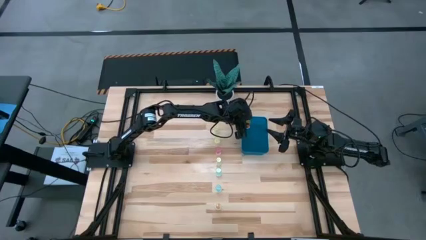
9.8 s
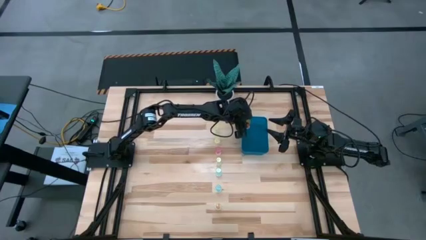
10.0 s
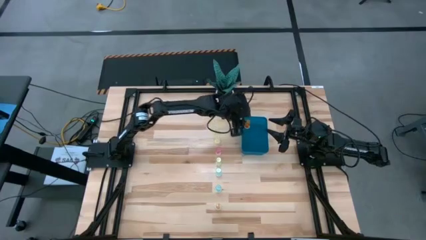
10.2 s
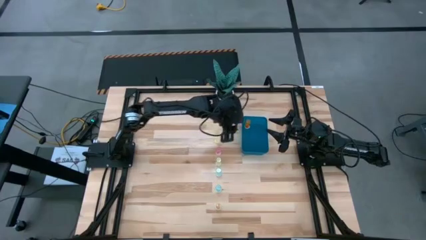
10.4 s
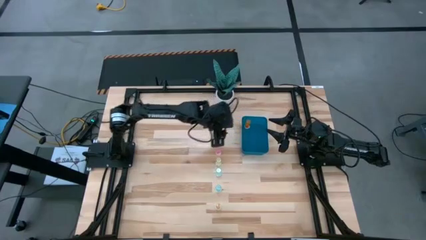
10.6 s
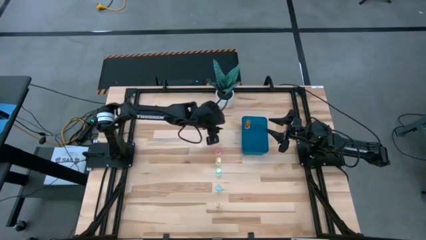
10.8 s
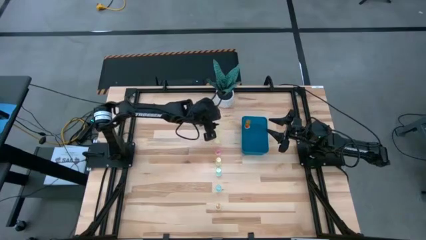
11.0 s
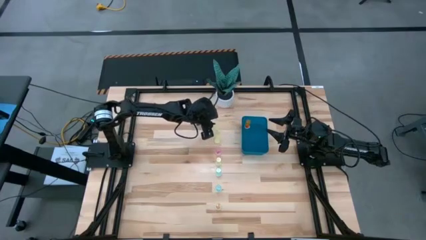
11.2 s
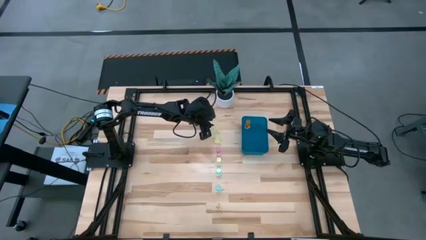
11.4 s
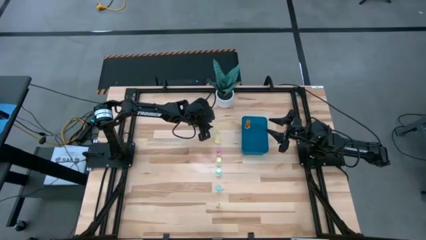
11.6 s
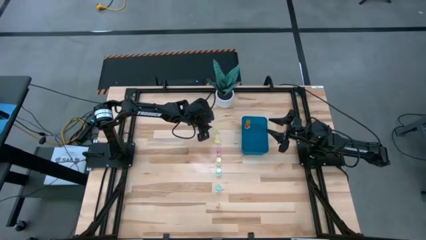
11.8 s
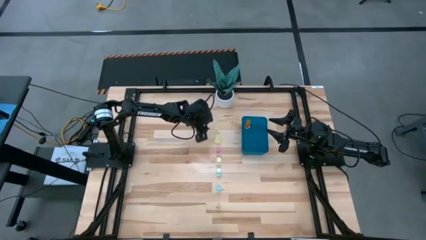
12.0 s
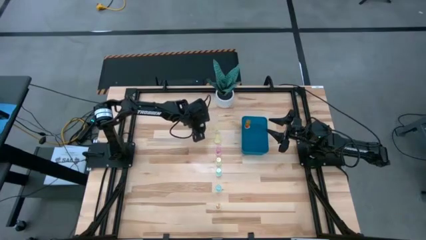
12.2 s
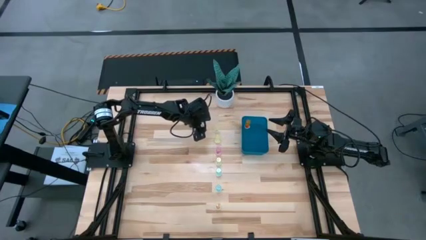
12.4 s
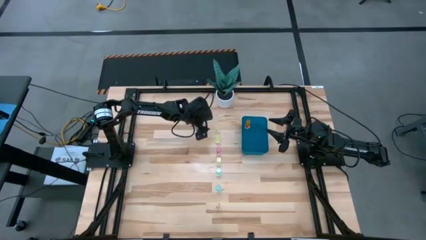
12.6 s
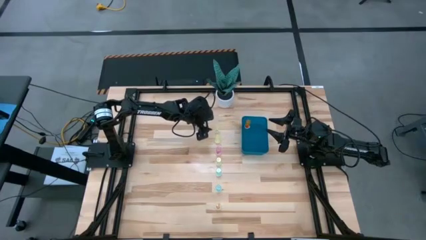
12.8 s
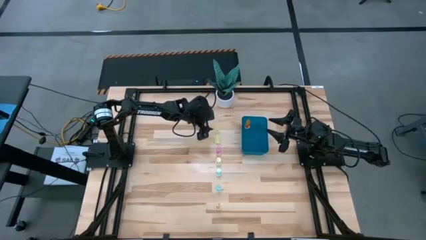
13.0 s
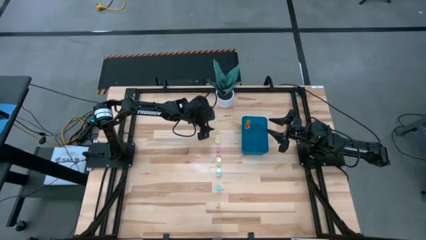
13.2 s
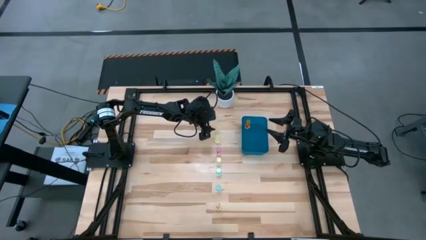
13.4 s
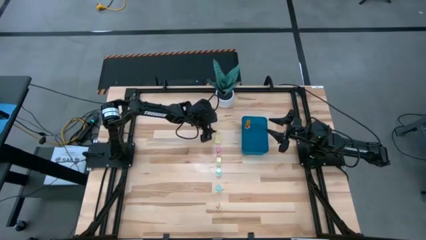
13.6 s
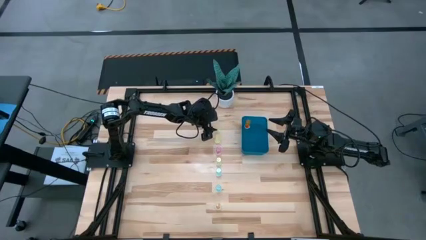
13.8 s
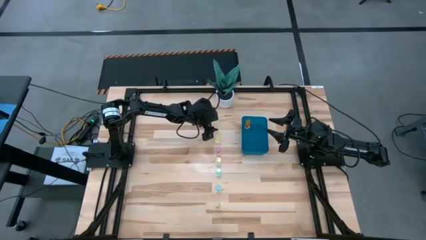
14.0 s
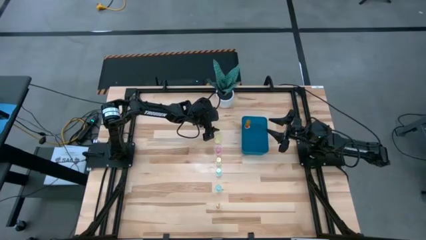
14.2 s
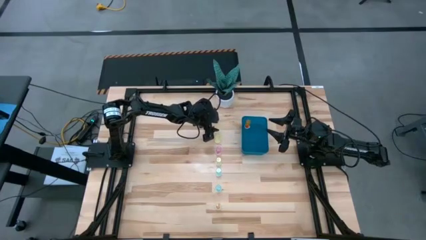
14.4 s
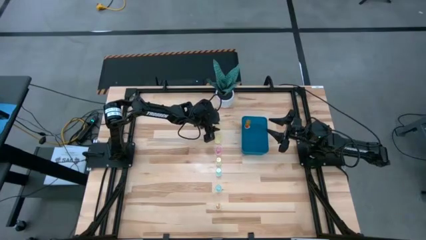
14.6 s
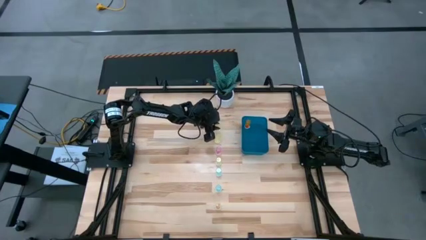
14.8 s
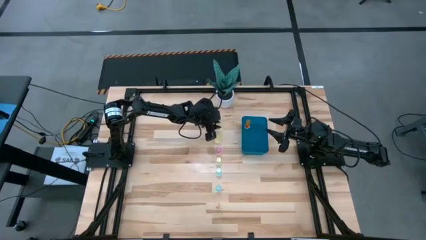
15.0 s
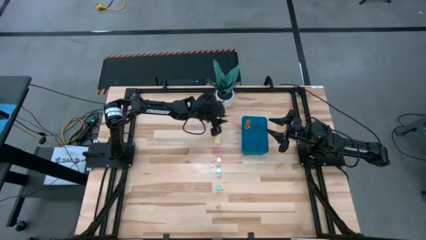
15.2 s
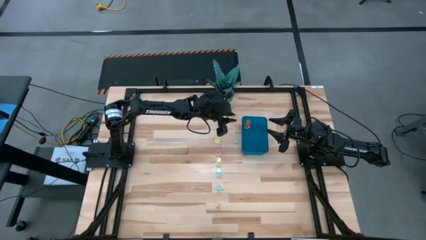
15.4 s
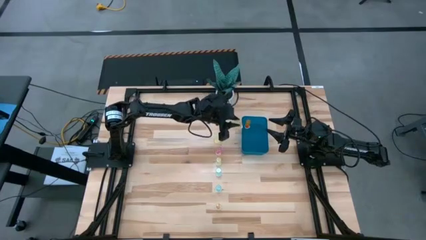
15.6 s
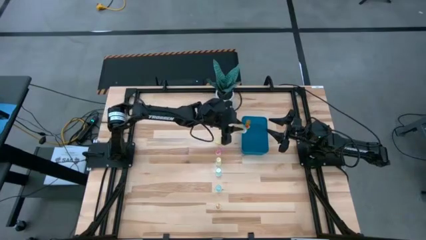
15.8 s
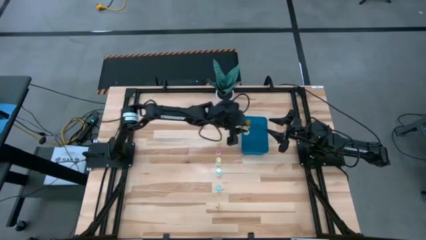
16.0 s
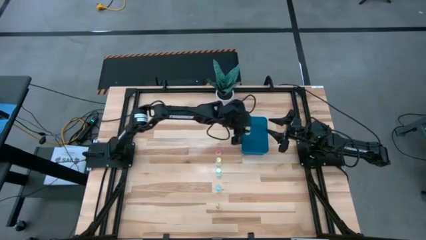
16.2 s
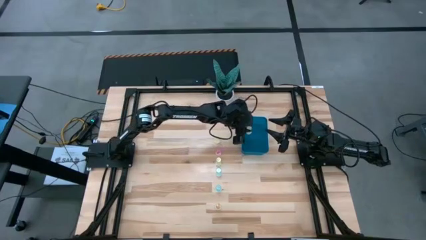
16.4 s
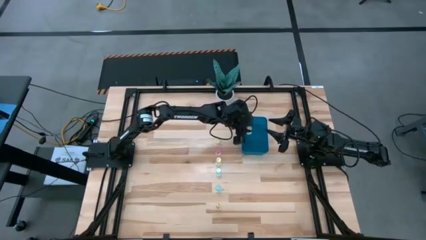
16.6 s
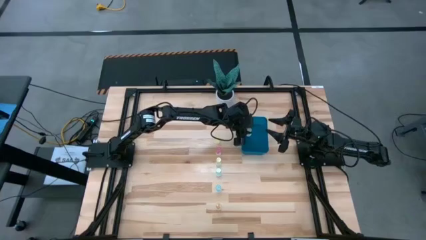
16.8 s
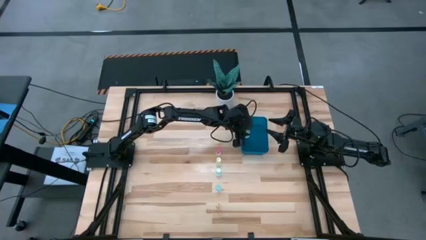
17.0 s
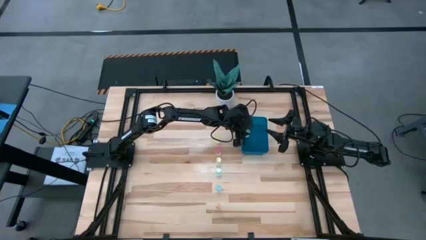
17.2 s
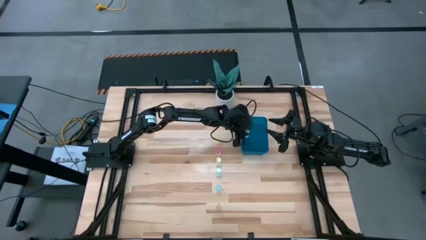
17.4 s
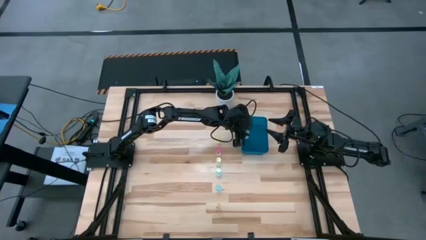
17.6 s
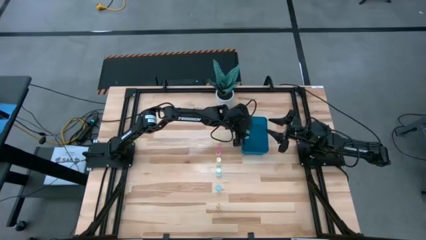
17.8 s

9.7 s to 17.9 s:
Task: Pick and place pill bottles into a basket
Put the green pill bottle into the blue bin

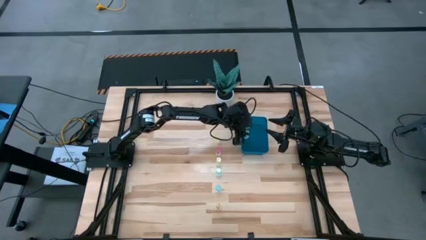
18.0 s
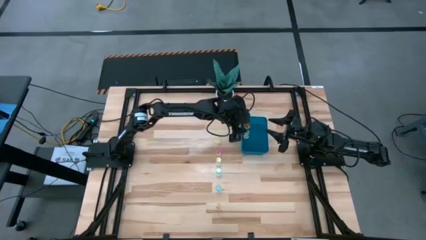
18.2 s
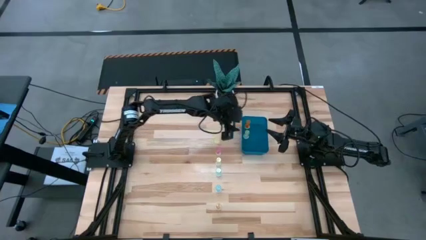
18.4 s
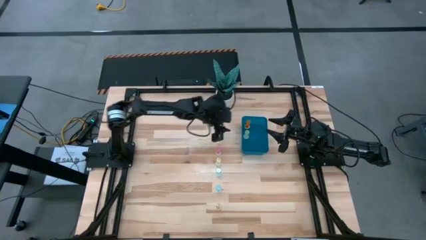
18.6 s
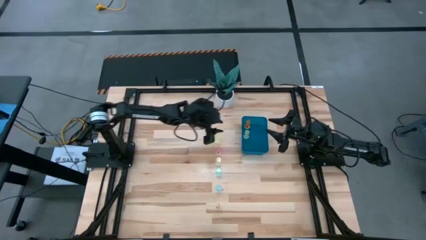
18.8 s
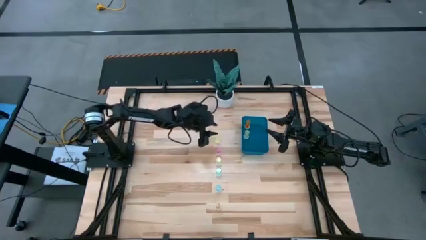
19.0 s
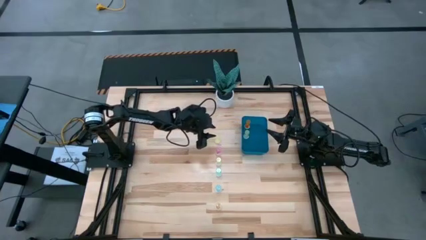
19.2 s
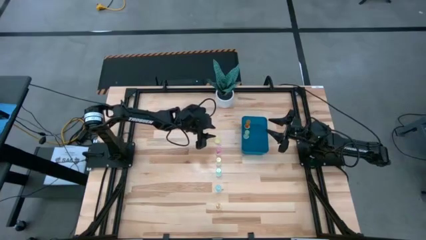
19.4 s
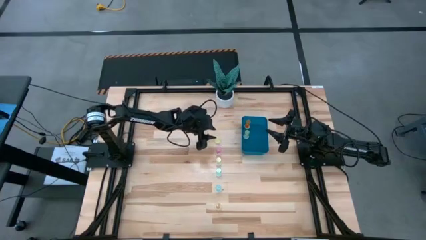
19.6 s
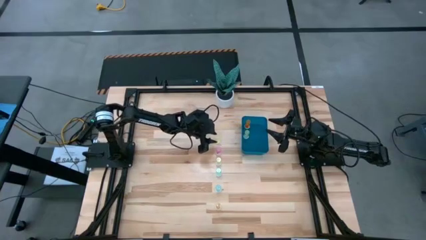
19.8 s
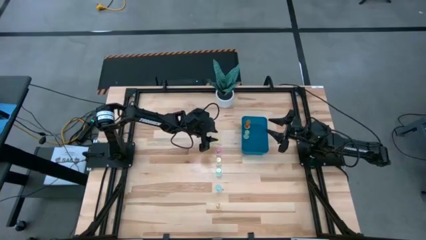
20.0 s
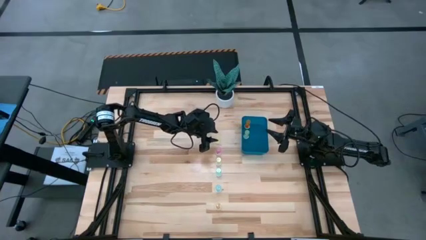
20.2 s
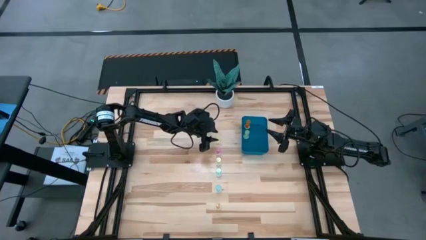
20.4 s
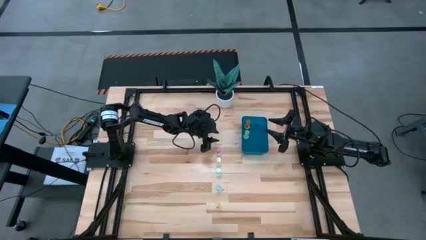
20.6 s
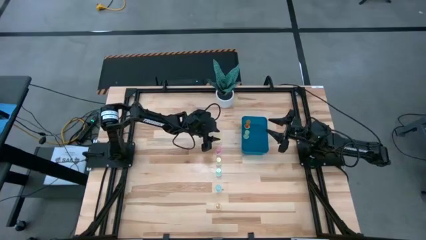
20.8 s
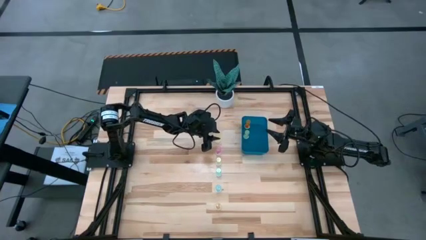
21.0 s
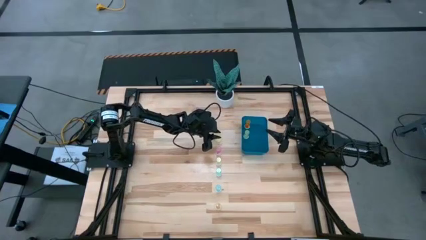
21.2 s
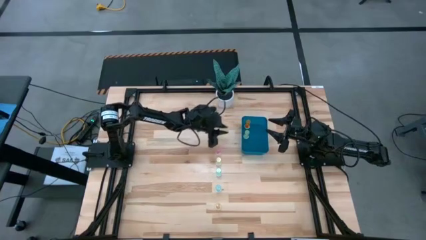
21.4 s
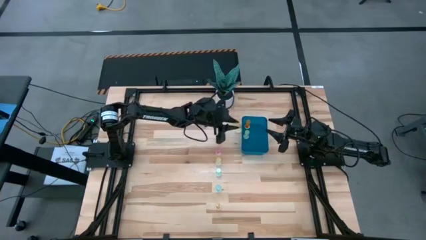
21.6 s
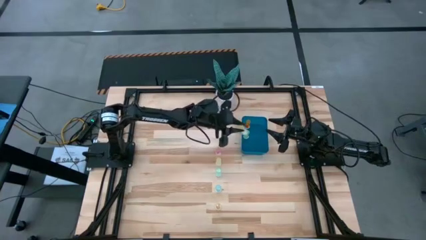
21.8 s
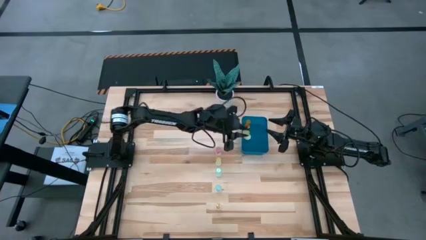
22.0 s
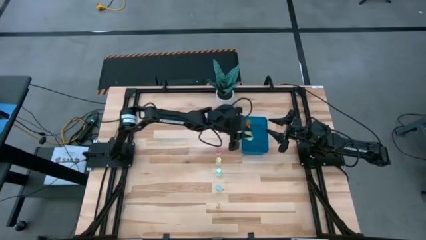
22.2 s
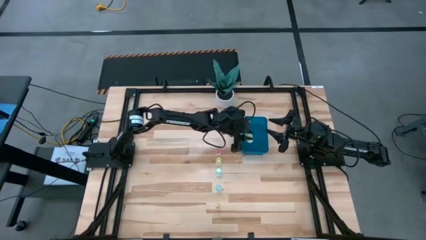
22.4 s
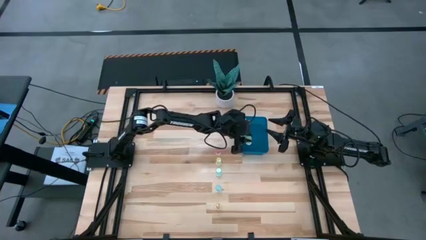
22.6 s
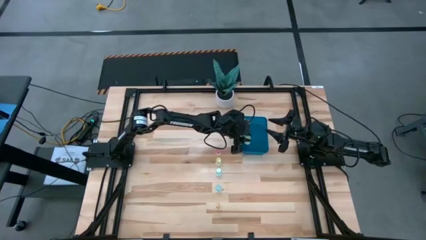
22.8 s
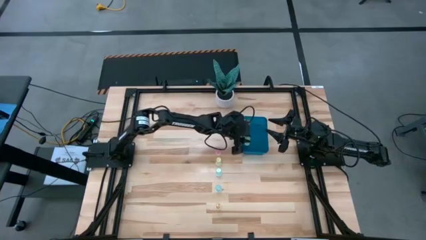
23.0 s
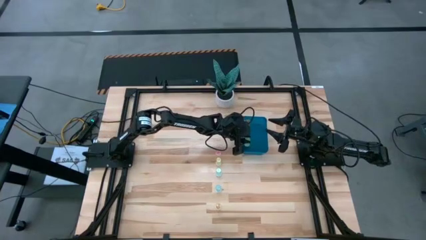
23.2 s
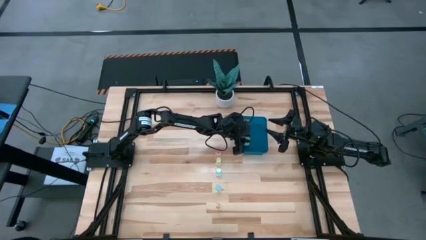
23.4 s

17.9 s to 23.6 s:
Put the top green pill bottle into the blue bin

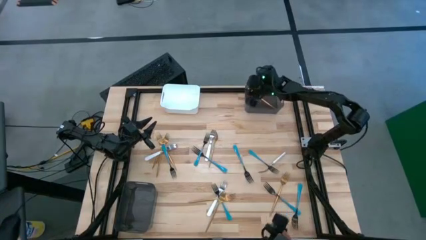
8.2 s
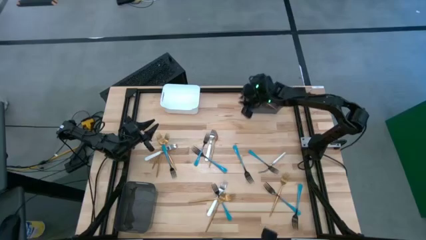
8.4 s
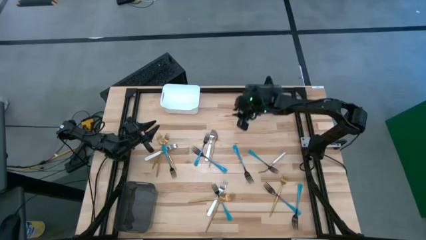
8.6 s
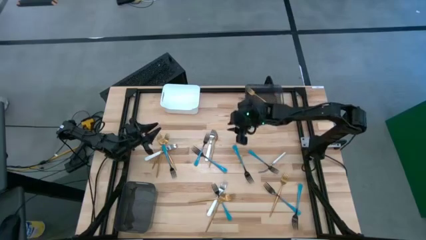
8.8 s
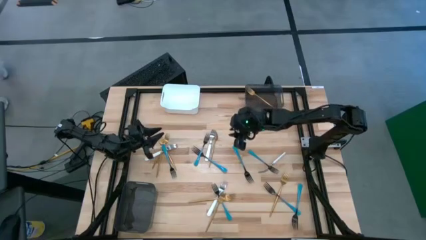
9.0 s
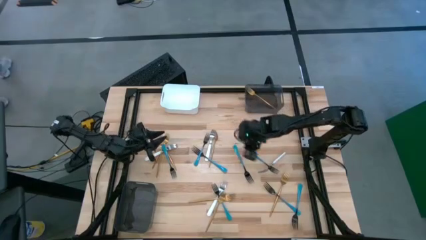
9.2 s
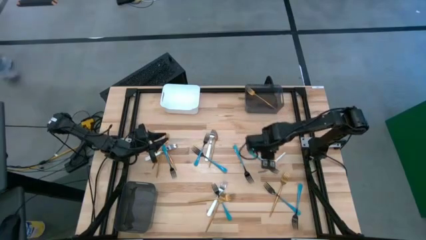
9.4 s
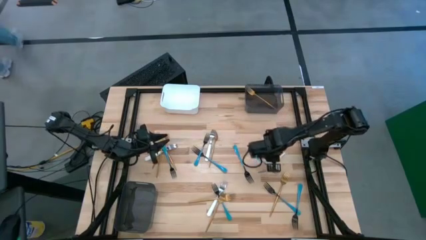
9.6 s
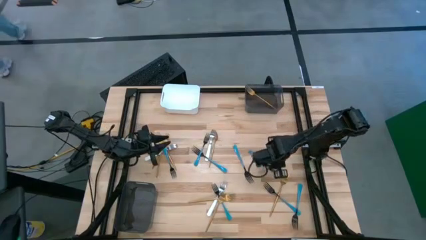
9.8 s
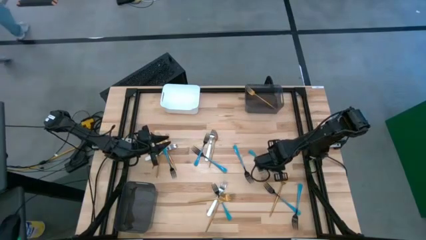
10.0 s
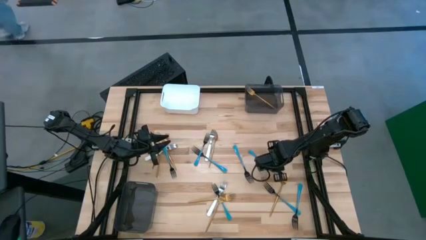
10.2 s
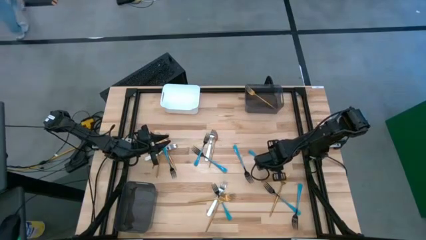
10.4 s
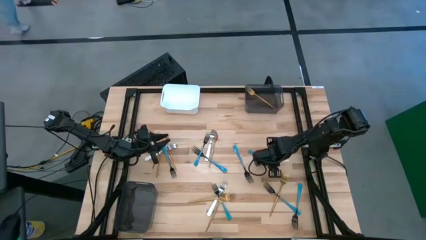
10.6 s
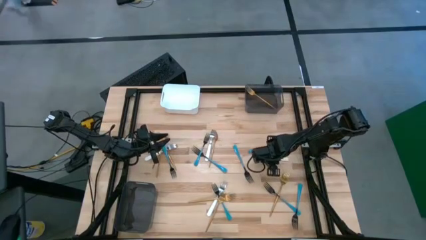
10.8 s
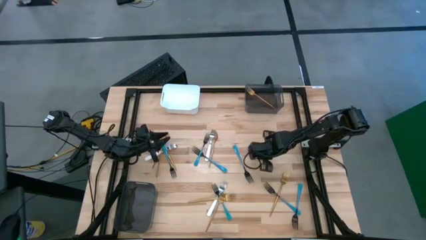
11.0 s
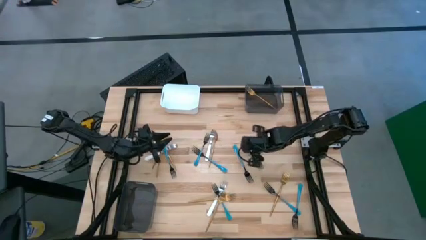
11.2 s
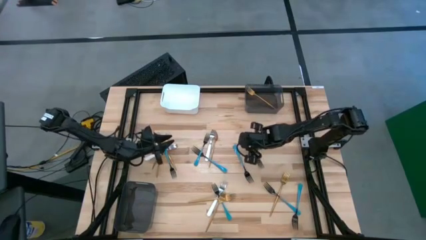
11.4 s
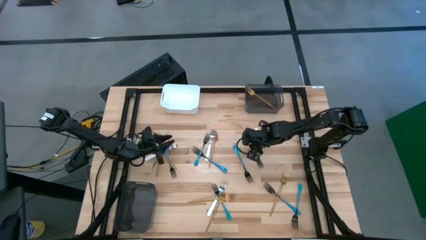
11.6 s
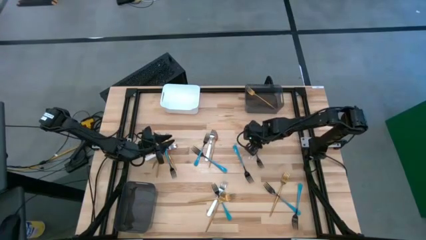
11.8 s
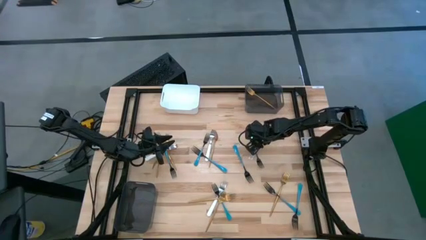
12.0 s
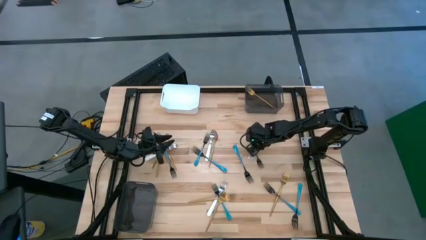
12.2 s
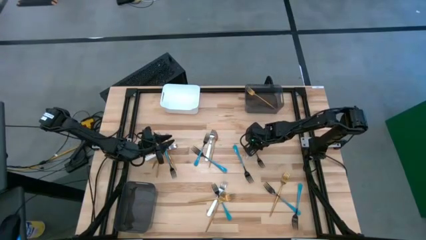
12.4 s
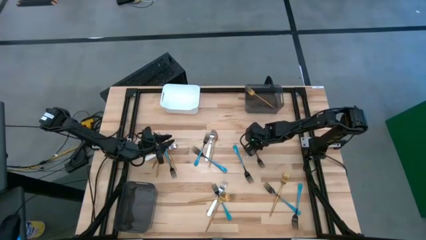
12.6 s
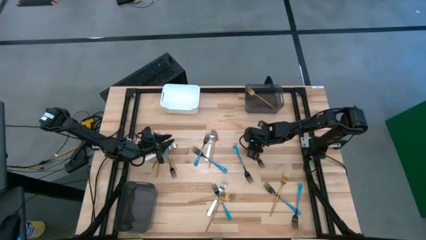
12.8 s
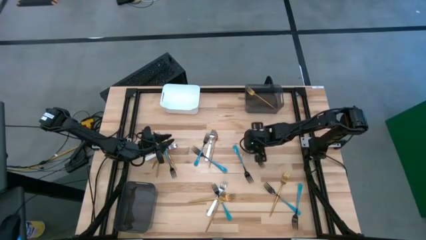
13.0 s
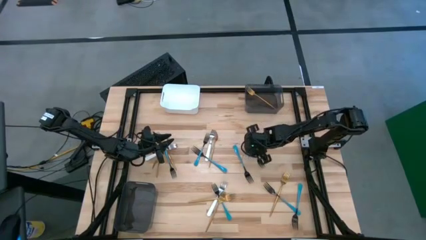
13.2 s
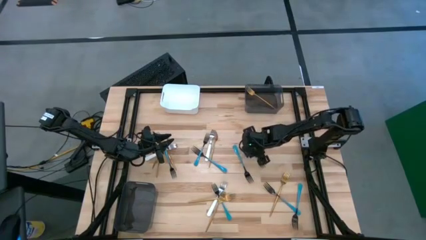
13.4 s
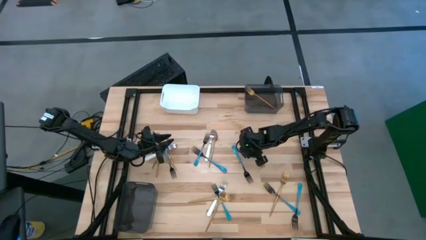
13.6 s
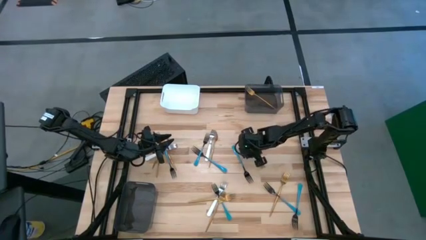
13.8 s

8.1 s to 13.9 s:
Task: Sort silverware by color (type)
Put the white fork into the white bin
